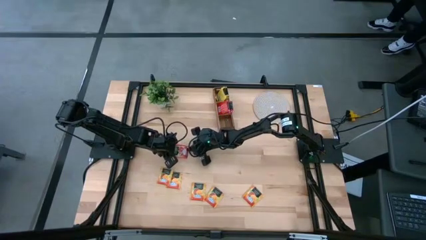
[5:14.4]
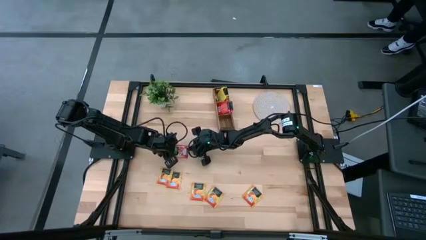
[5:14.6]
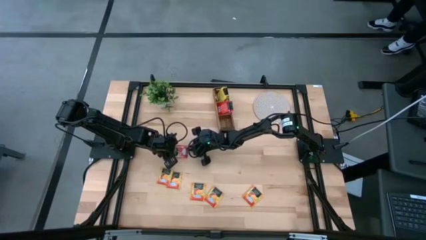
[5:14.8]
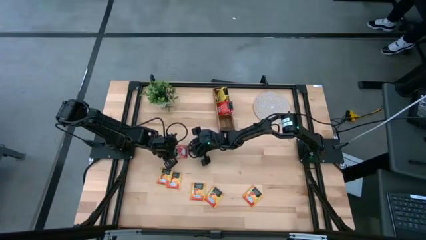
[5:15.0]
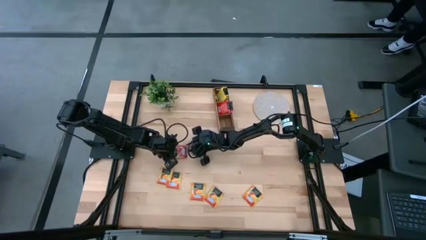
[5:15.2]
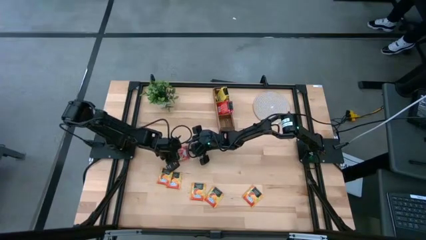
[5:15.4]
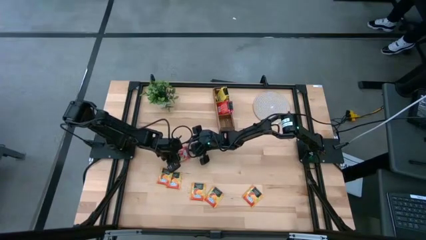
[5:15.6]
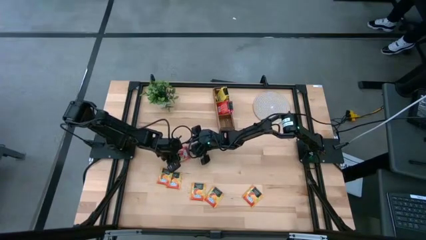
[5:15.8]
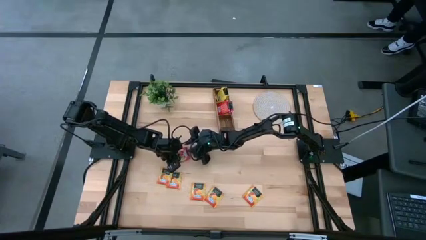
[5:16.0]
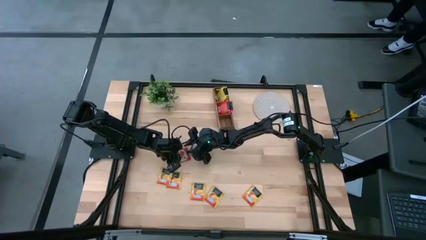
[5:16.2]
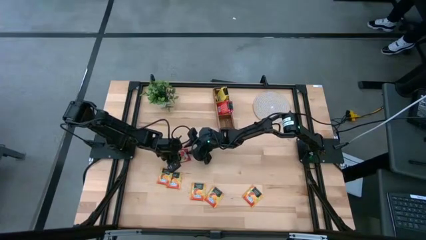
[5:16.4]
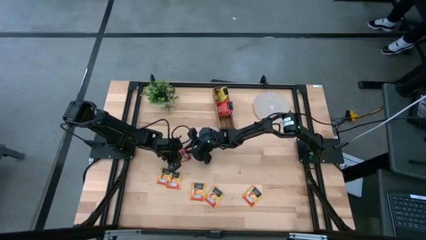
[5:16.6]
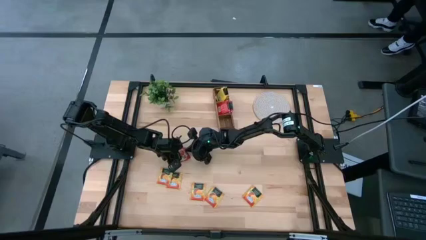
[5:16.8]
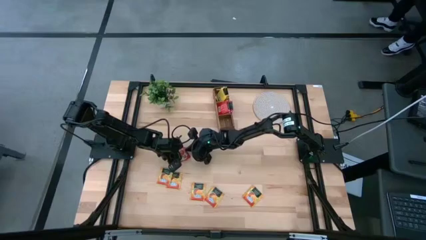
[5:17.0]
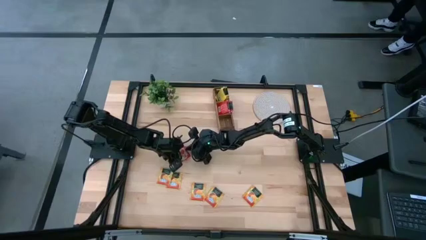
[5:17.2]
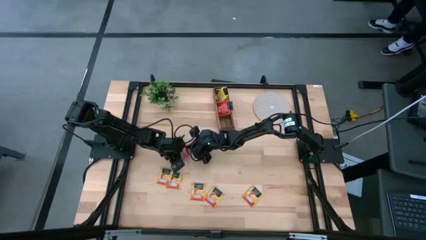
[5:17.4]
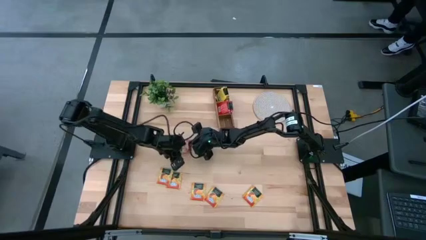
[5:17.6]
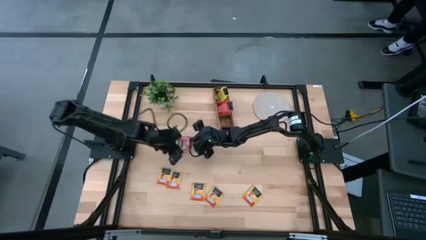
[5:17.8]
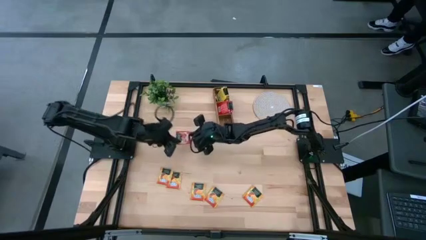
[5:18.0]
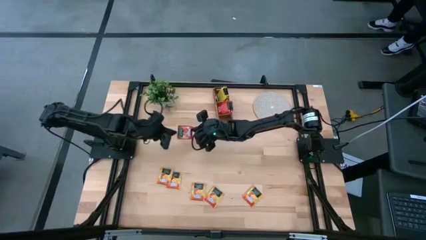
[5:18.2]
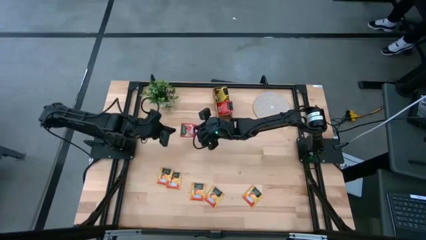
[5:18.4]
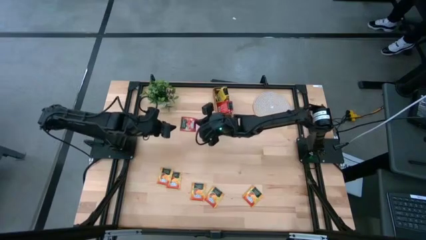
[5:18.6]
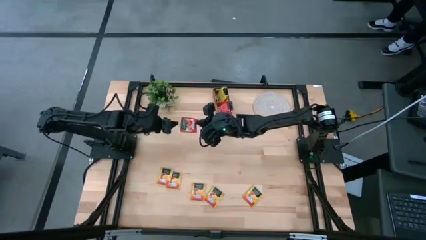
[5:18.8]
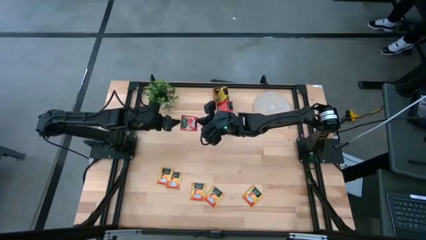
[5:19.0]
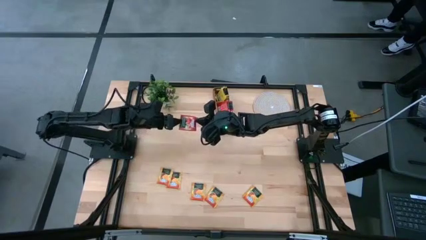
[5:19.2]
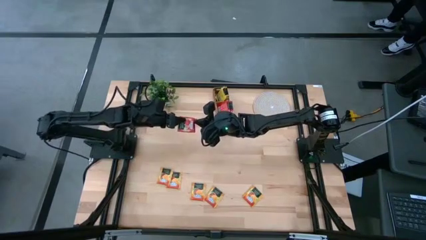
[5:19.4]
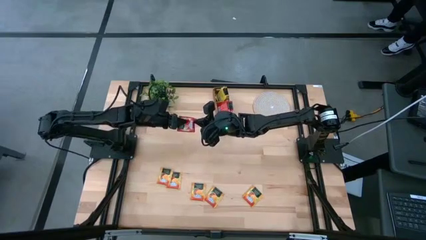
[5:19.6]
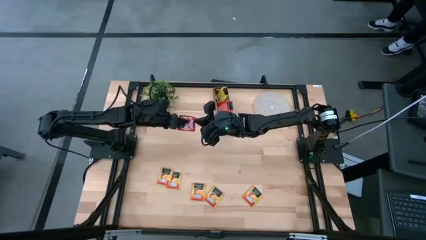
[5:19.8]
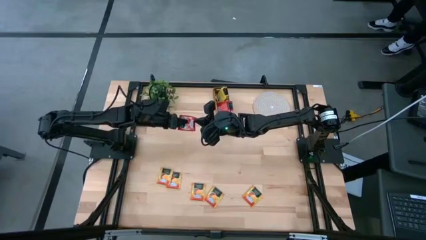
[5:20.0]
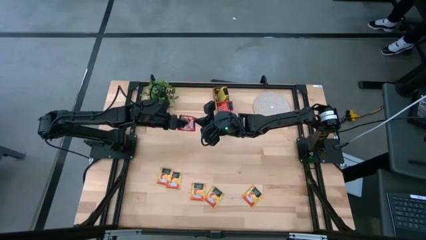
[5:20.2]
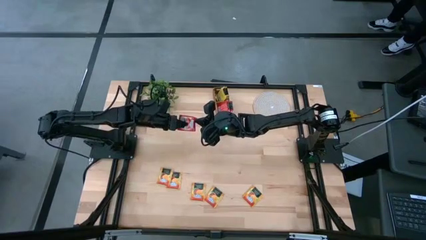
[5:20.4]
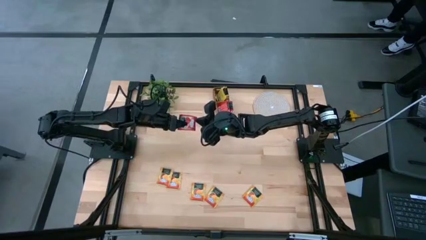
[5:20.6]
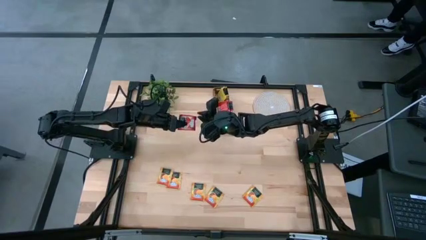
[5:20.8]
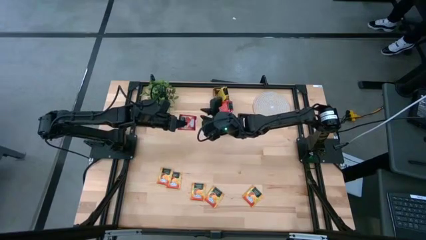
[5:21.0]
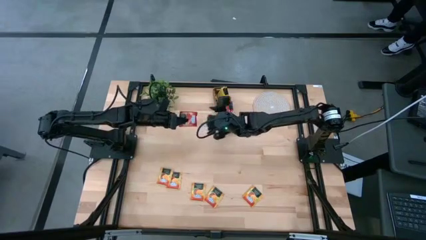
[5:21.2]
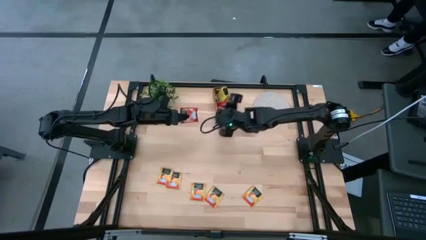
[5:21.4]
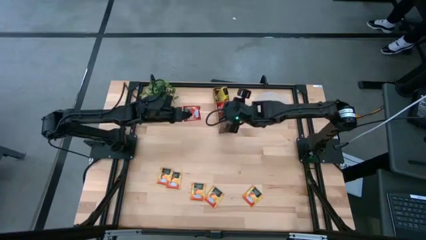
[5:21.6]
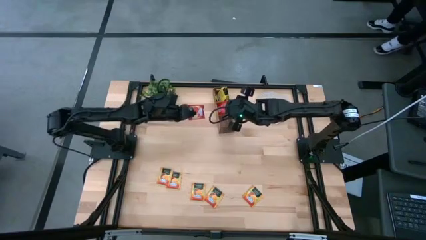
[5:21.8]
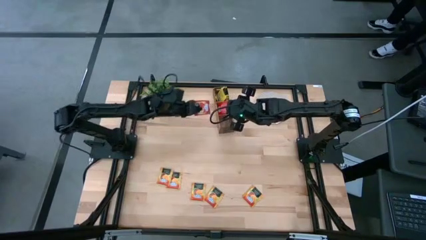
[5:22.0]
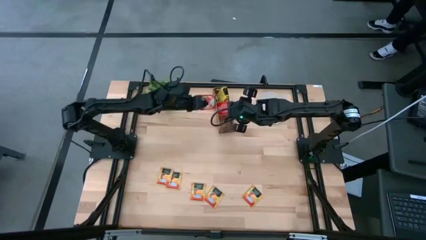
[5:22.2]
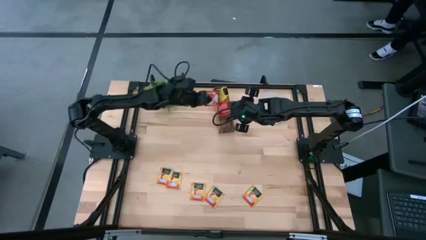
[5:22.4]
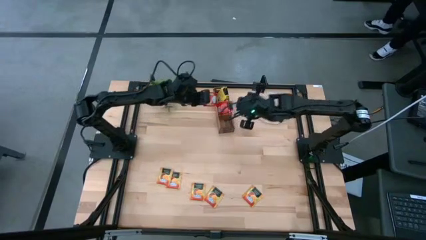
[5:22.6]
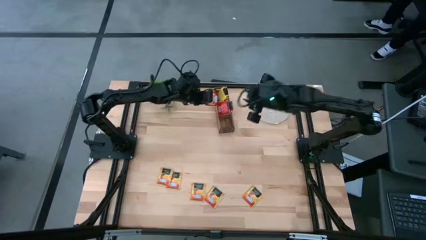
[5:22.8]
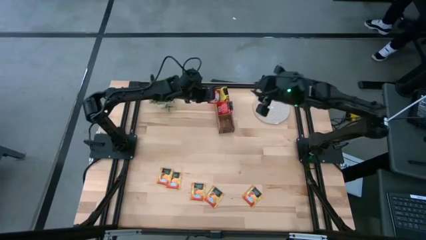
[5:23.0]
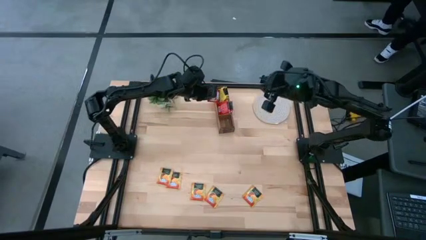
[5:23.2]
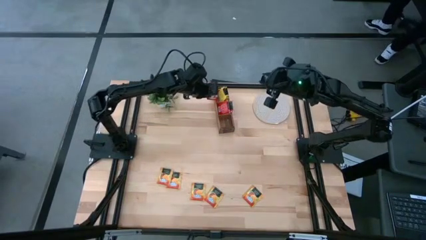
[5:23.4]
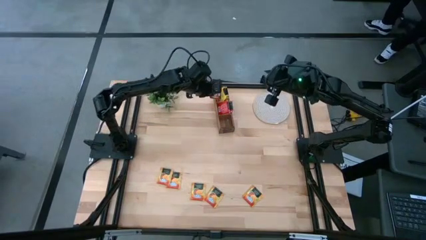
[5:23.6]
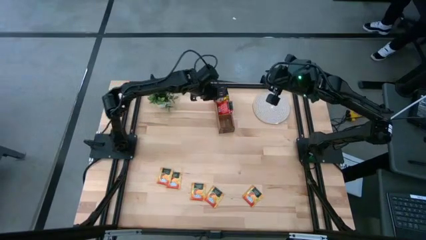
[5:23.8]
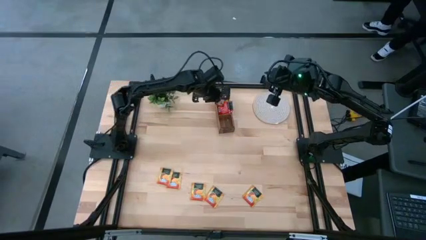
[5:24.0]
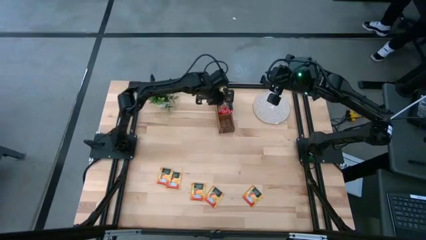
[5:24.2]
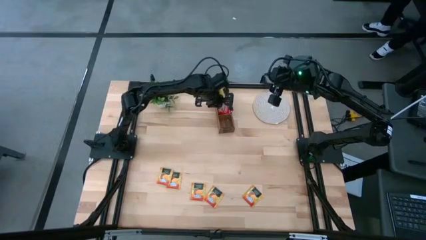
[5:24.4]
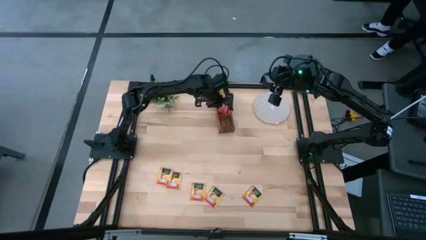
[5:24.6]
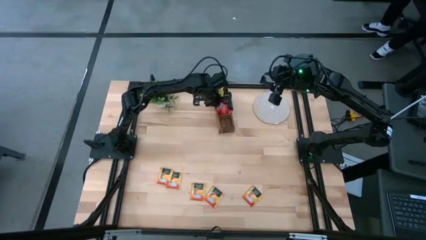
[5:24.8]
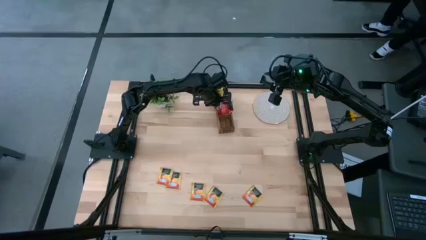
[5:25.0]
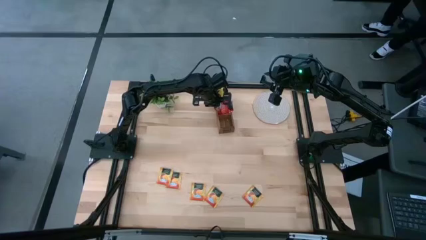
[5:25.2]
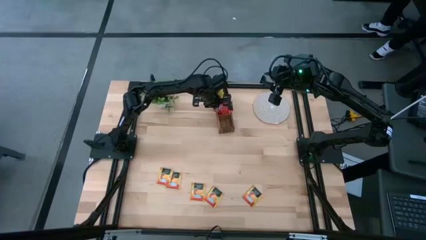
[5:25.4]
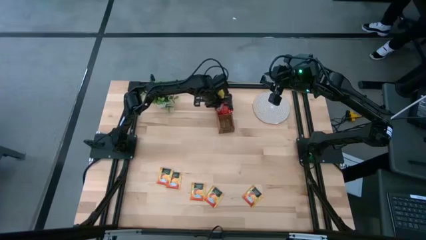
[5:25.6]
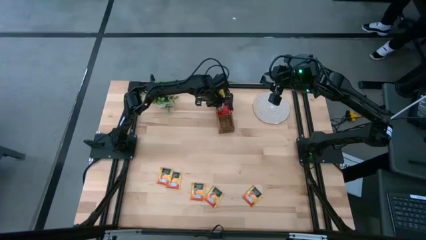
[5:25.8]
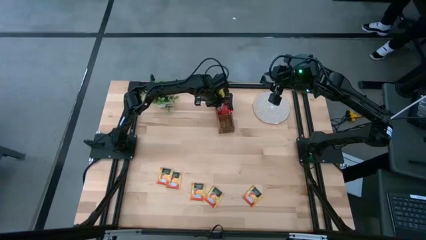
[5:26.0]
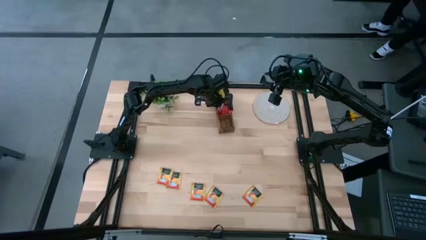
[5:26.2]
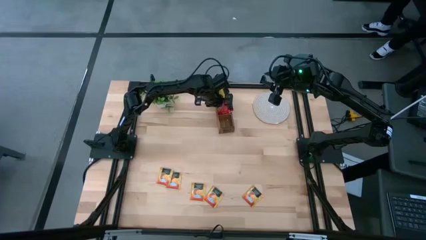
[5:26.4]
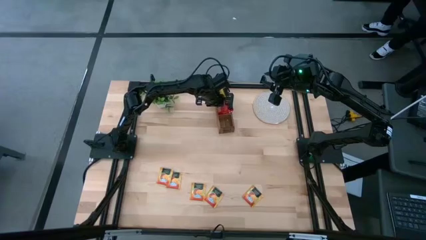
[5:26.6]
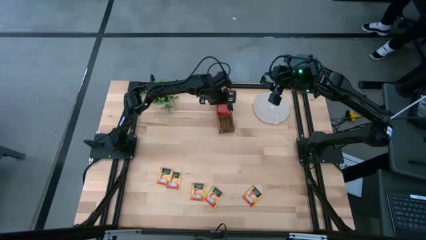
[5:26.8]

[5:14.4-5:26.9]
Task: Pick & Place Tea
Put the red tea bag into the middle section of the wooden organizer

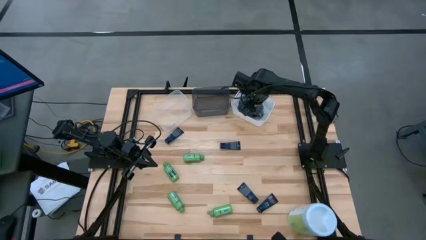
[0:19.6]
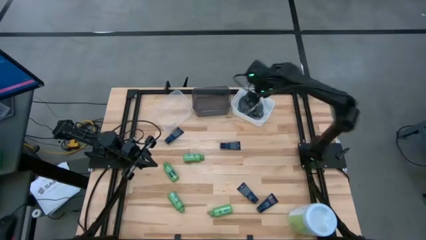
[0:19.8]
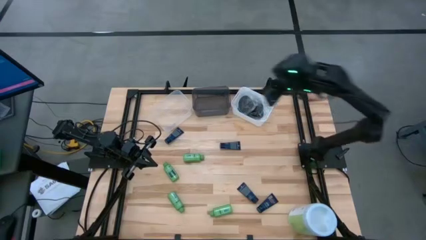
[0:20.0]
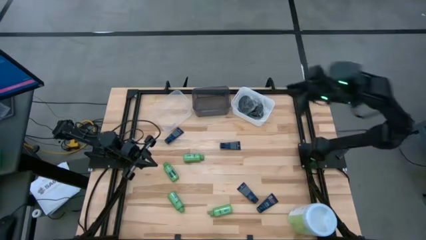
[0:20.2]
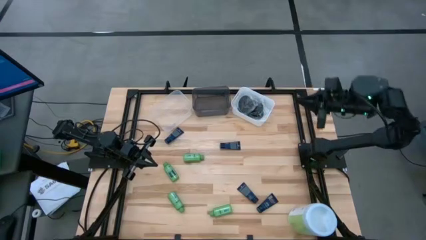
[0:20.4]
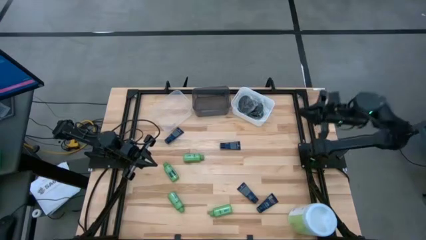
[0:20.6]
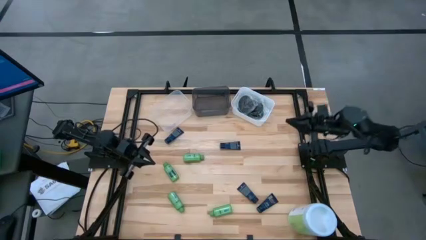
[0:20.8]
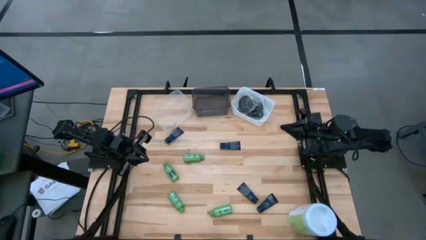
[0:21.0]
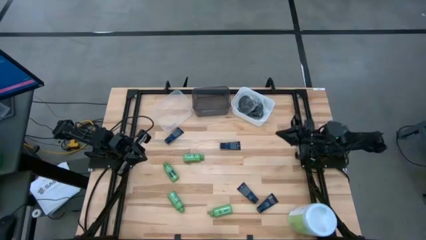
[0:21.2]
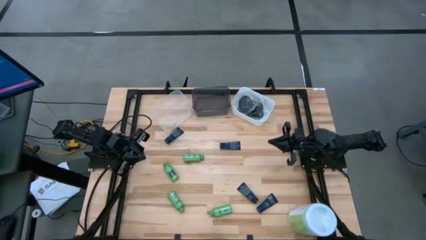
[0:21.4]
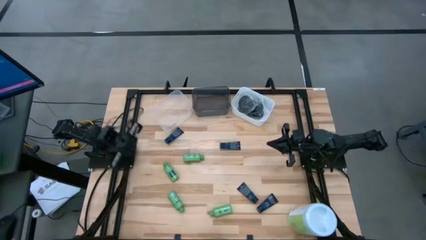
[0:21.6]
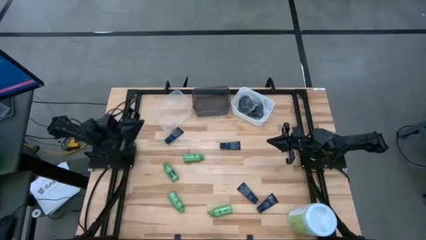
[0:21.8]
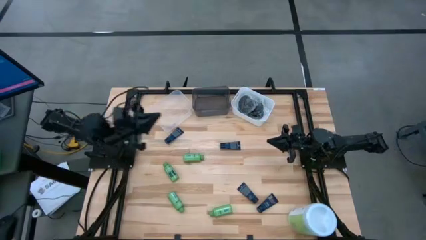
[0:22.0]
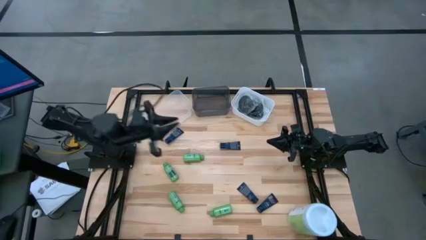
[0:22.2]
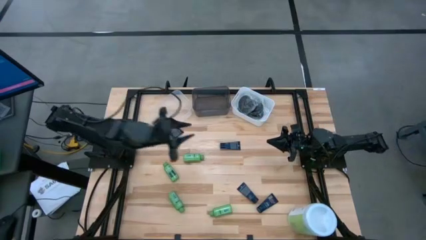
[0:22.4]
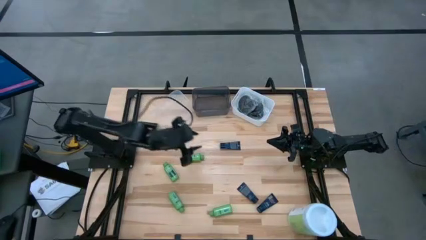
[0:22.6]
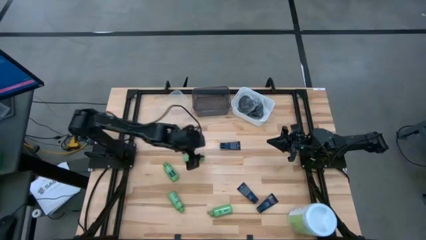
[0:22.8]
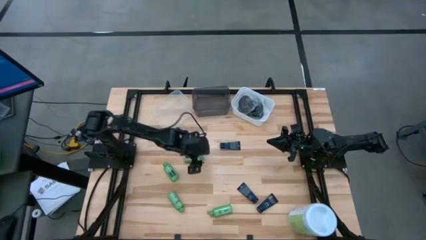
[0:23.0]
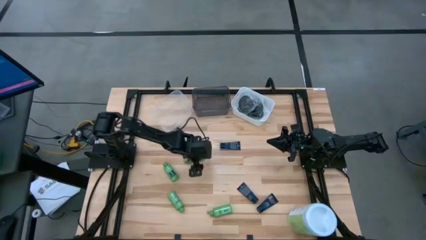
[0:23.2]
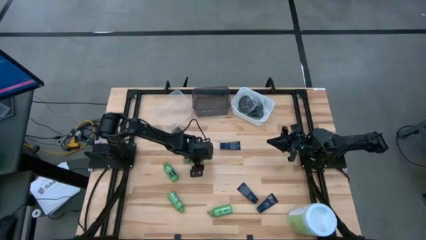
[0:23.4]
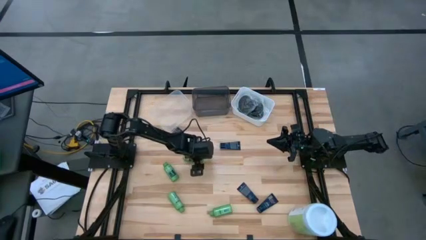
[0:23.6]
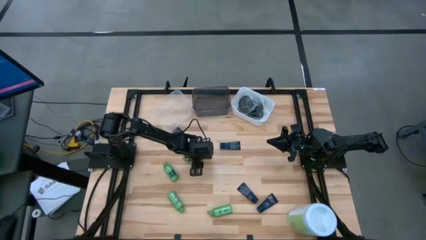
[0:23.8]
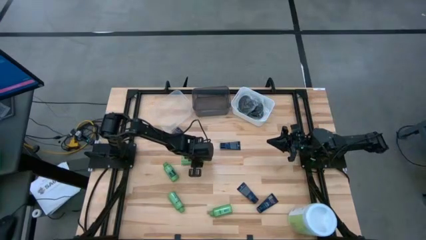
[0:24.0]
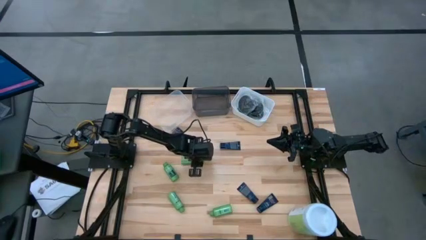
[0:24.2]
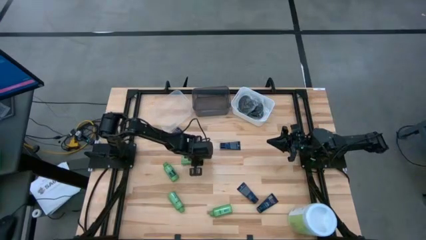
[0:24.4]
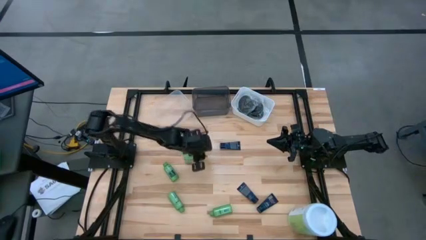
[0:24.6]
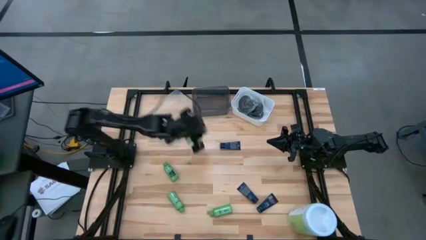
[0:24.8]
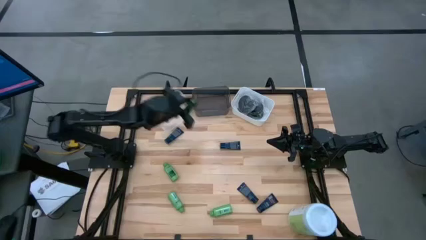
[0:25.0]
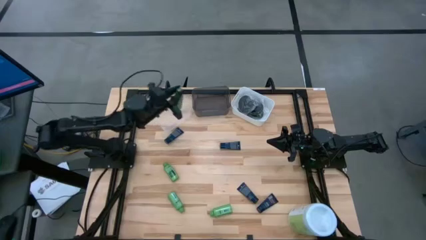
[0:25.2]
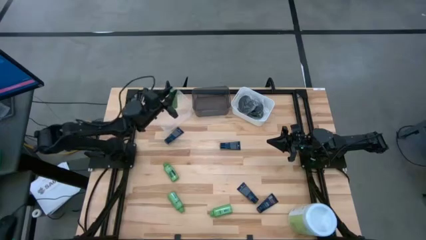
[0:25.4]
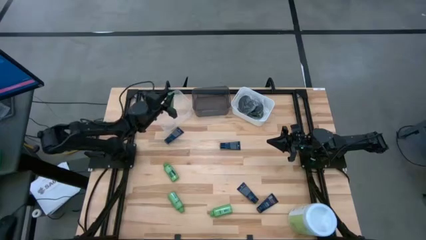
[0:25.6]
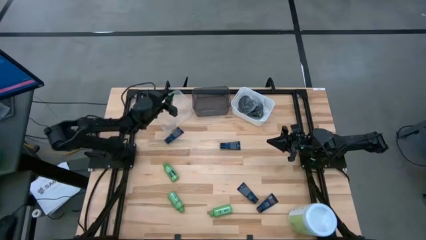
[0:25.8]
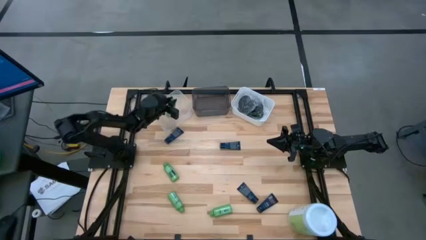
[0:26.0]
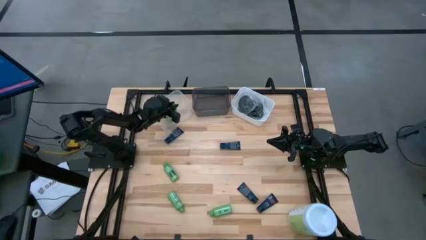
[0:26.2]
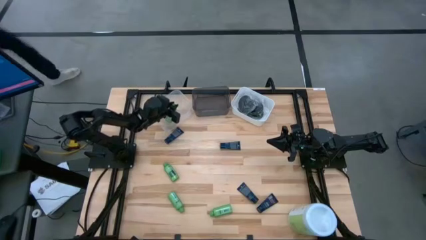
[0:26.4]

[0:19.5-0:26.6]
Task: Pick & Place Travel size toiletries
Put the green shampoo into the transparent bin
